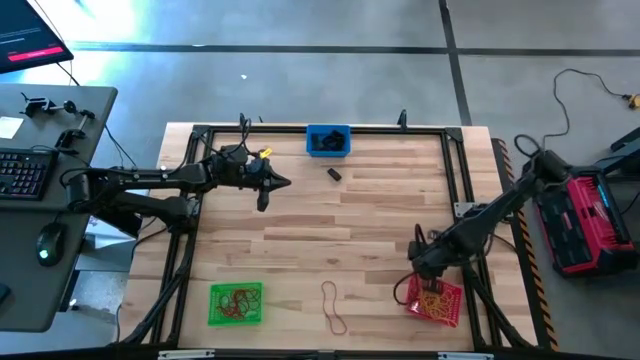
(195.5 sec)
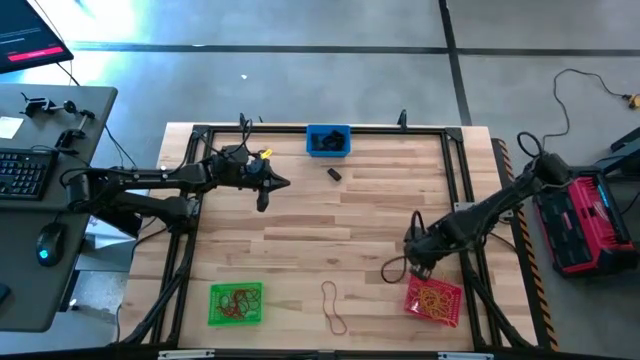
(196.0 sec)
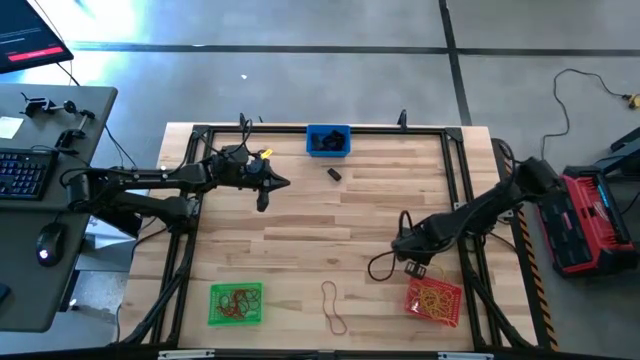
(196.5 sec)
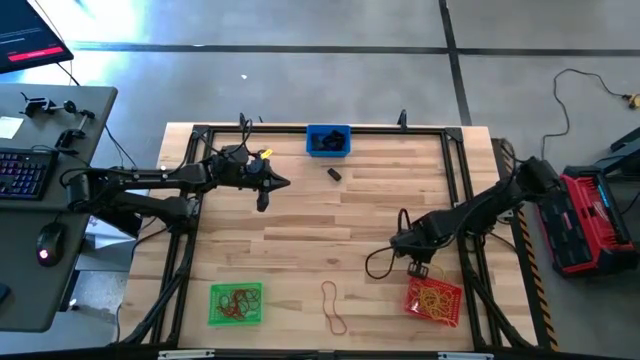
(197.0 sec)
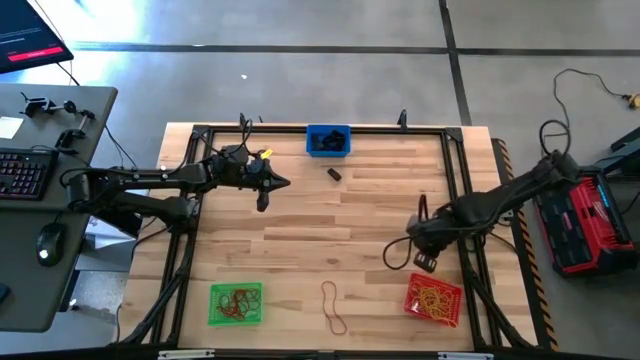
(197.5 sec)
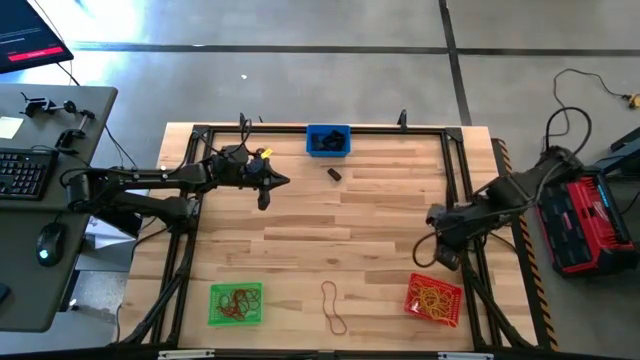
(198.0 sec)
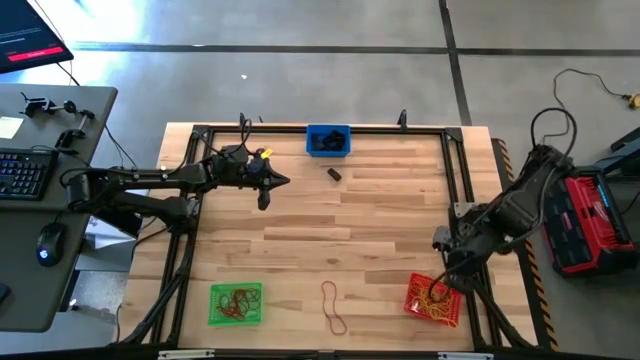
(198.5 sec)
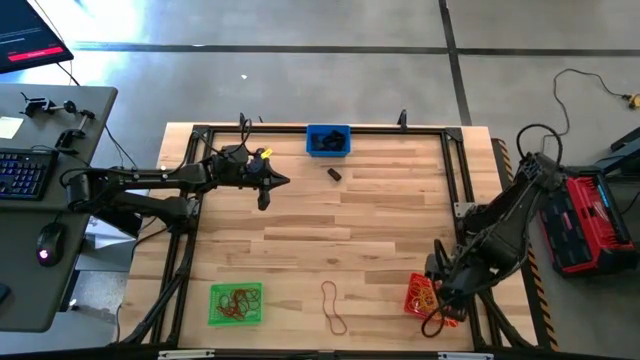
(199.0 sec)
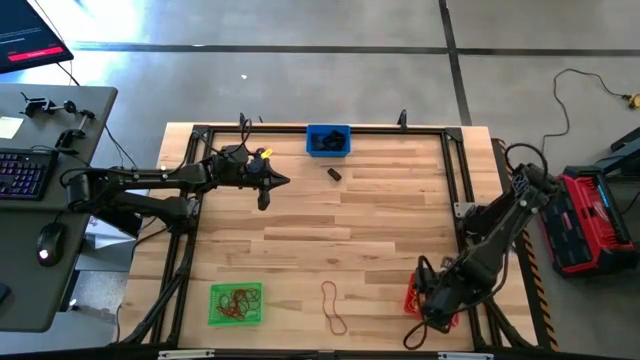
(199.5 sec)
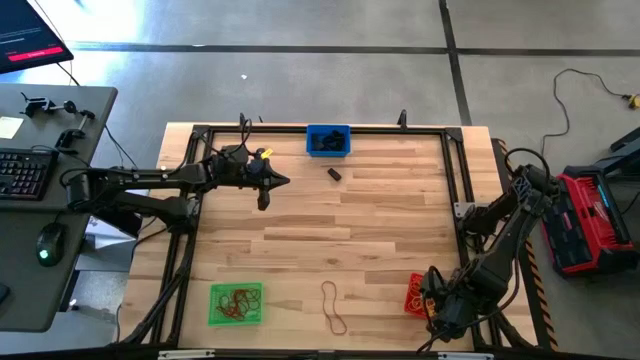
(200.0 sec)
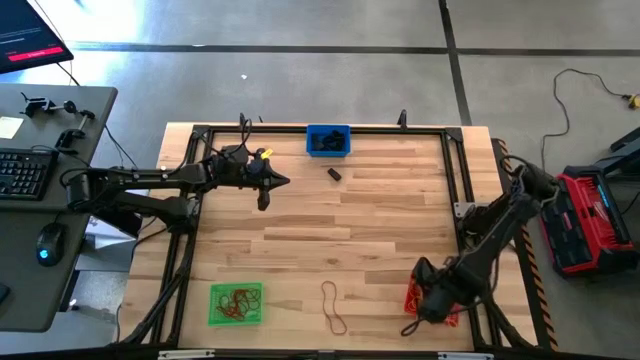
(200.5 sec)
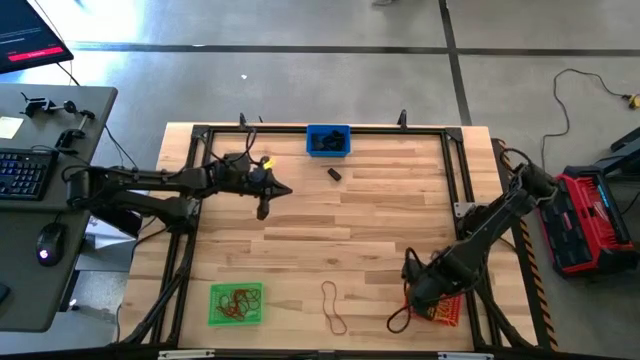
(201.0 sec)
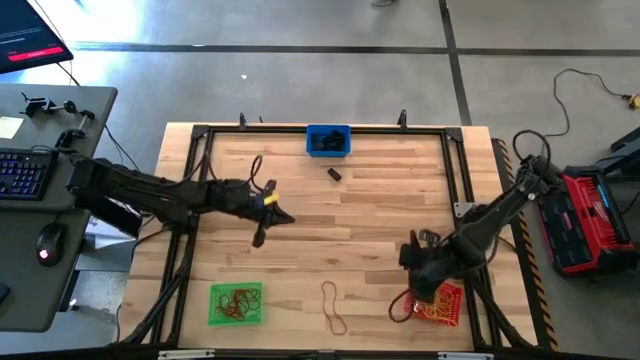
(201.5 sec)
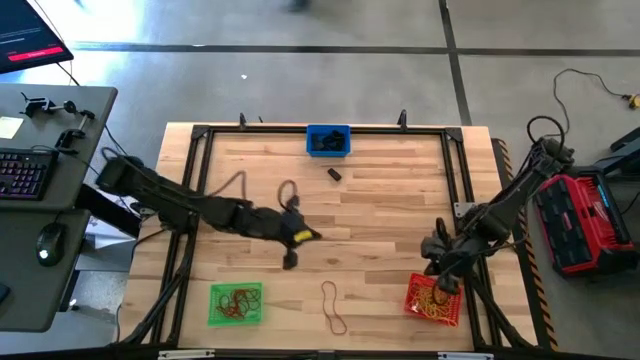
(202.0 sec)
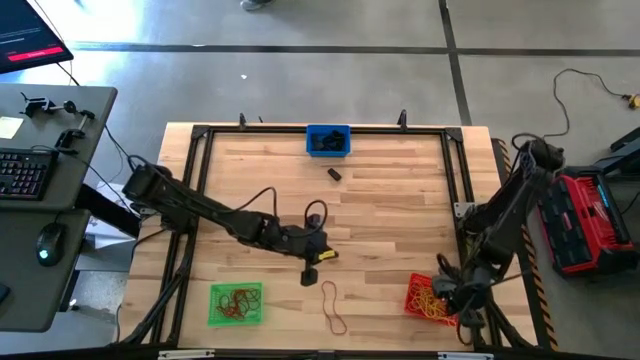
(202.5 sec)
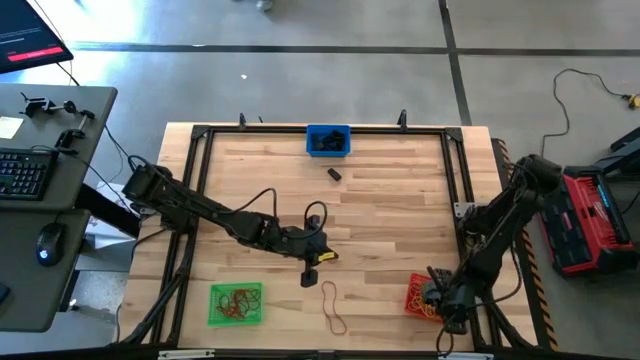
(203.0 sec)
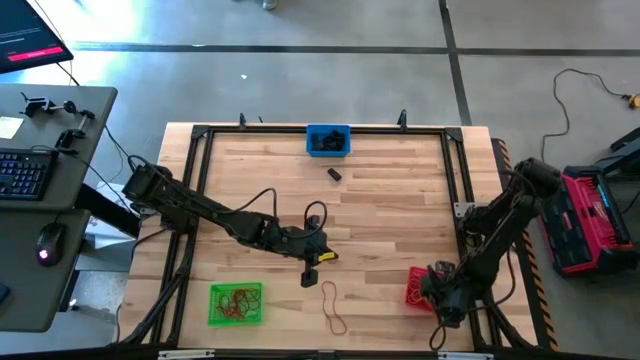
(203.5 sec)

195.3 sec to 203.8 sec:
Task: Sort rubber bands into baskets
Put the yellow rubber band into the red basket

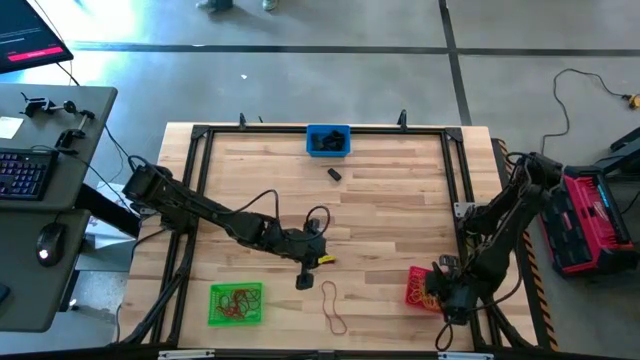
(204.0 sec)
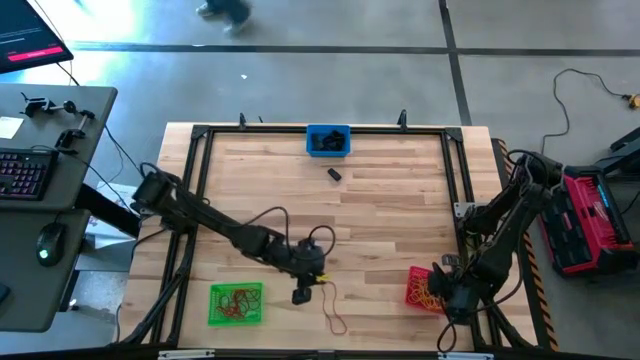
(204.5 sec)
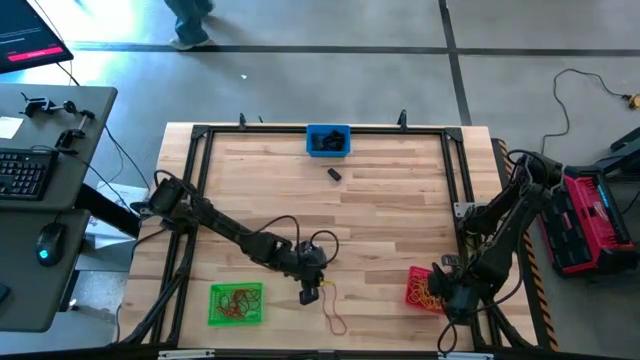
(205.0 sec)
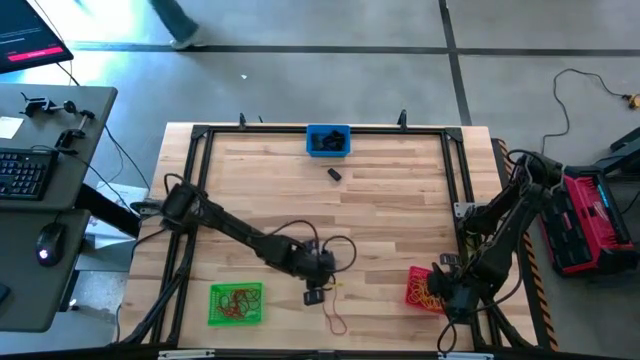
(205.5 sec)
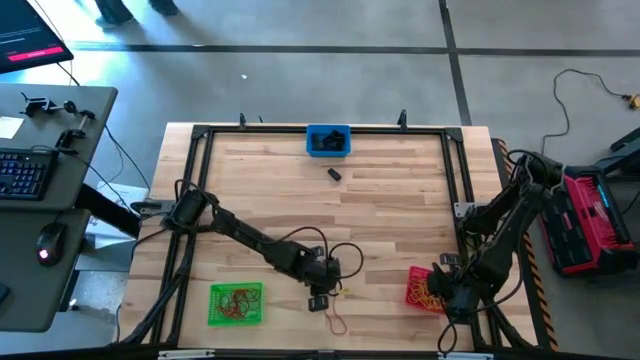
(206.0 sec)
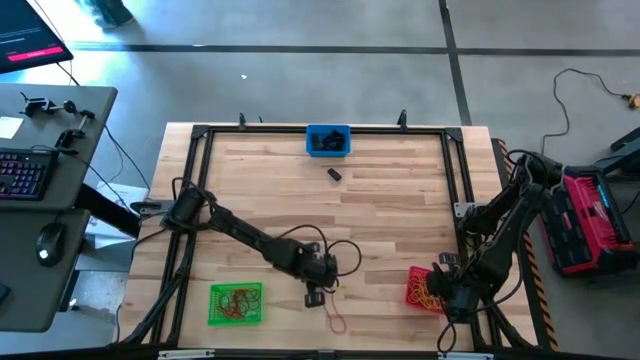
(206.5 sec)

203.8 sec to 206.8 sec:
Put the red rubber band into the green basket

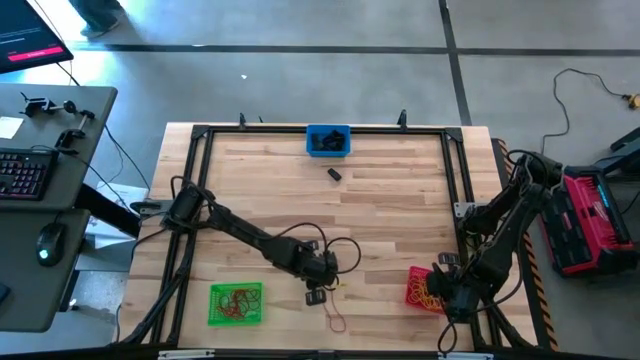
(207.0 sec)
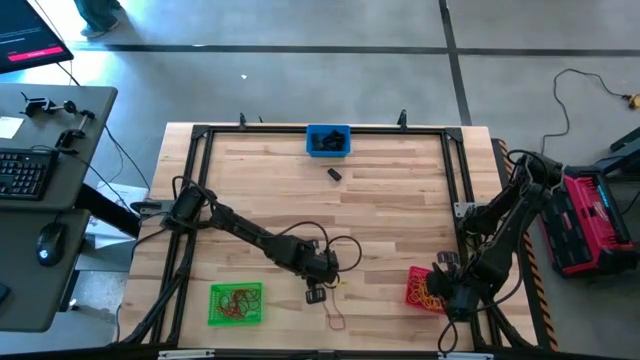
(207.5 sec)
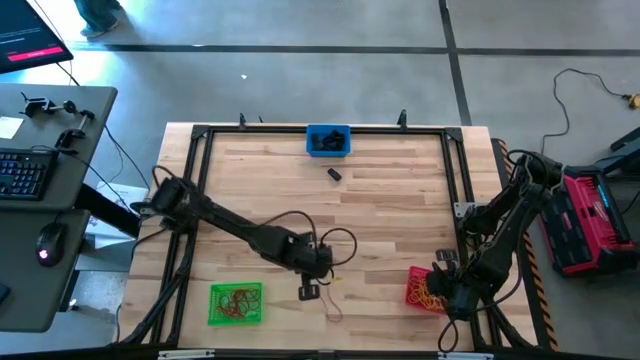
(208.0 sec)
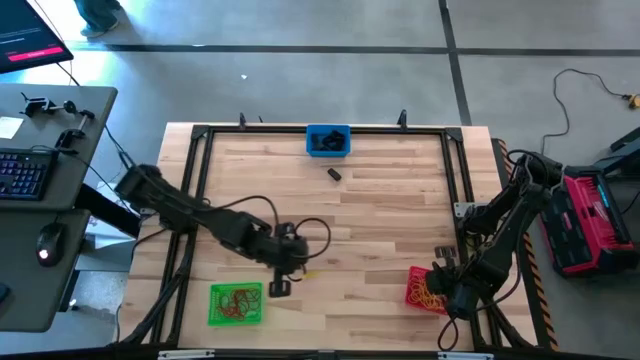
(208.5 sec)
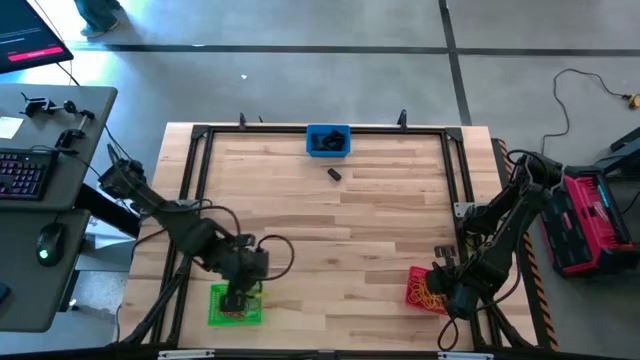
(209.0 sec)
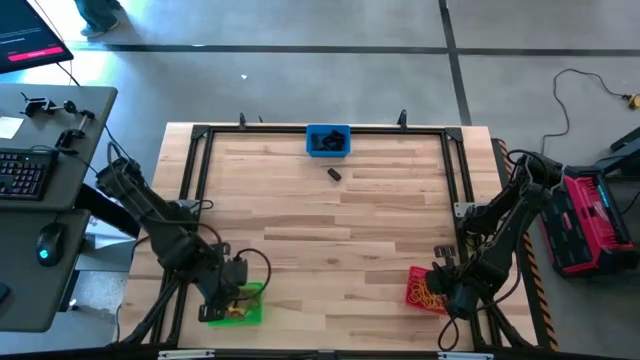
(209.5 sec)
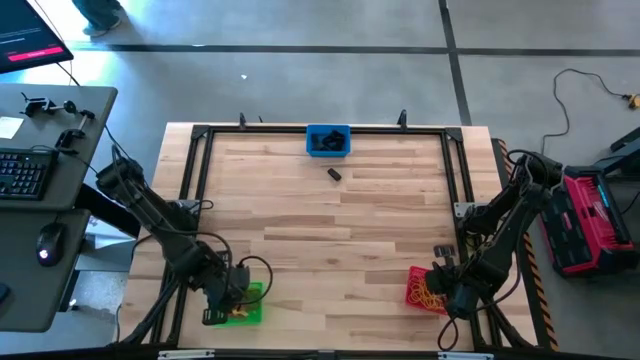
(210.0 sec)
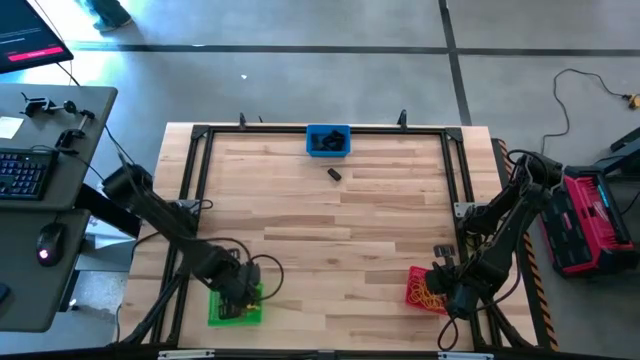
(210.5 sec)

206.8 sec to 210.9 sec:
Put the red rubber band into the green basket

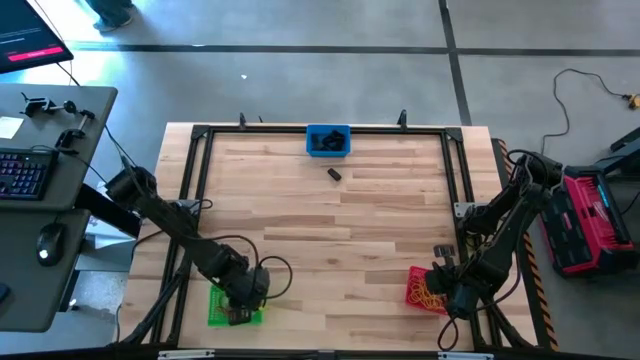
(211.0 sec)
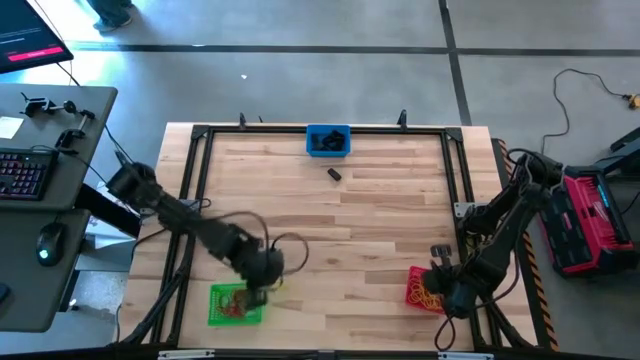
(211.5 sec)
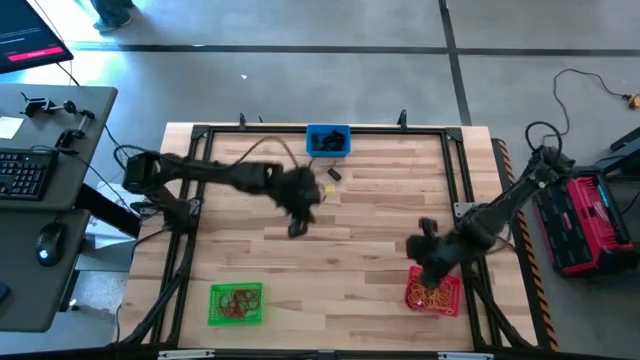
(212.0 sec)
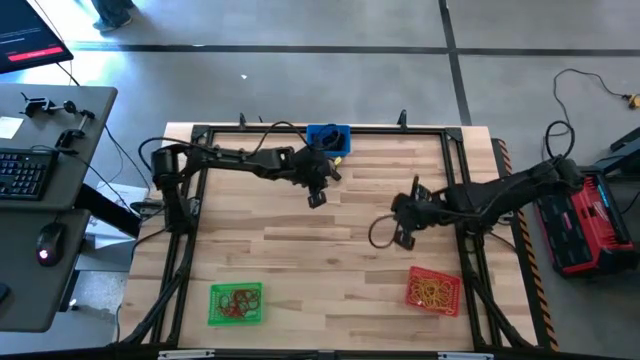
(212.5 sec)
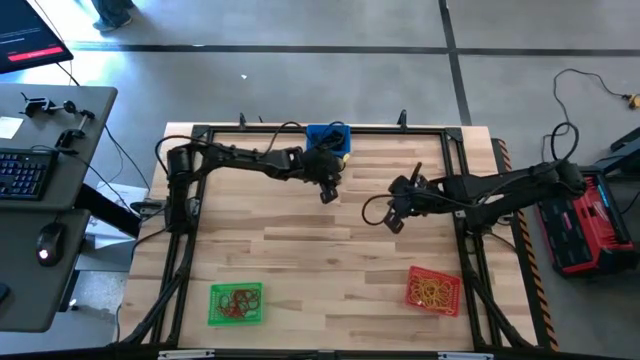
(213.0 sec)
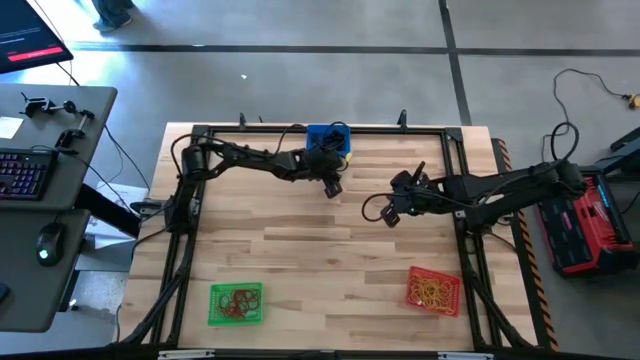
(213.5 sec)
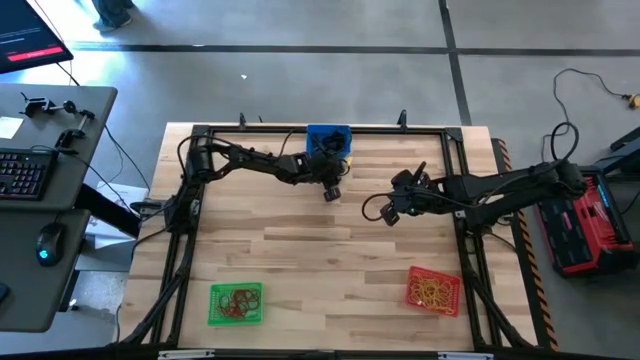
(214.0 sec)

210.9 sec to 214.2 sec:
Put the black rubber band into the blue basket

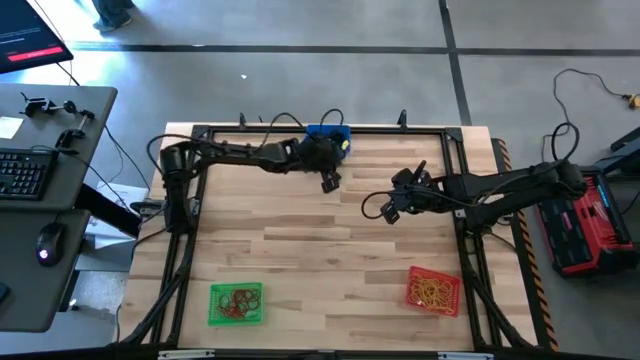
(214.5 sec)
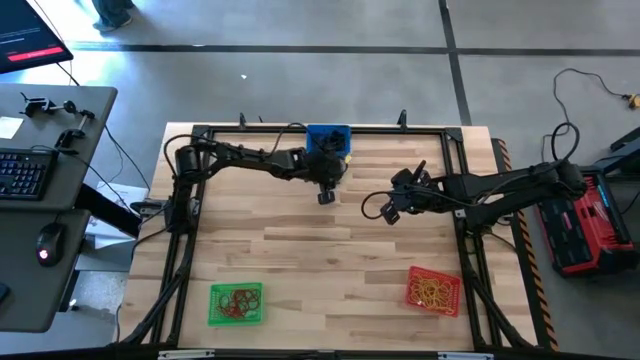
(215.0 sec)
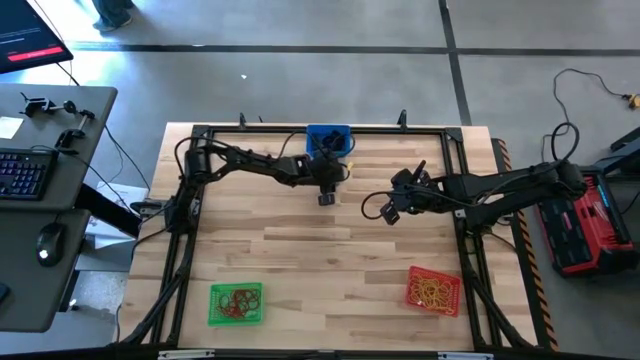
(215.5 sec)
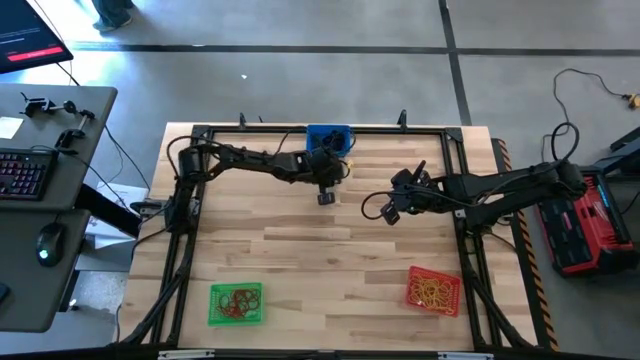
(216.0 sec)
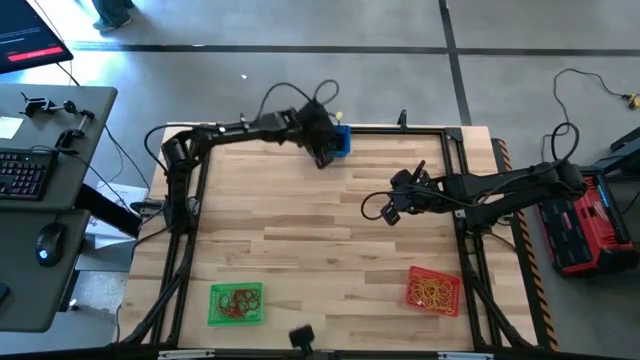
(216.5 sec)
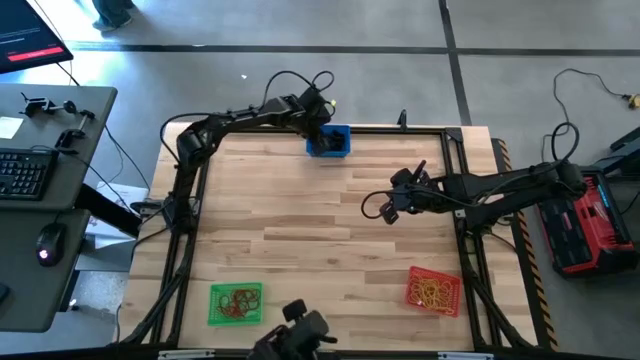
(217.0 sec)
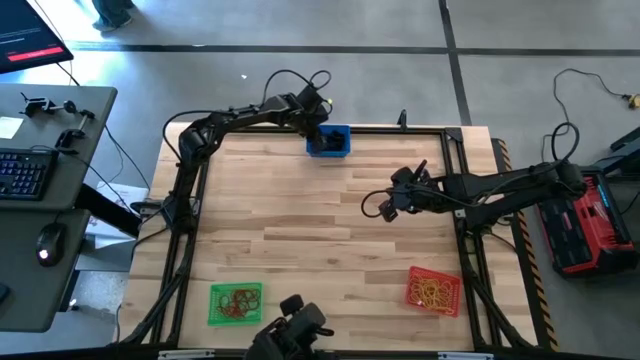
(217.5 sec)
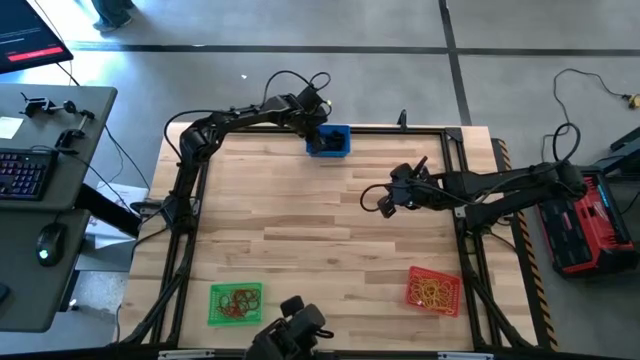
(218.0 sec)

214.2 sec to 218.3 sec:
Put the black rubber band into the blue basket
